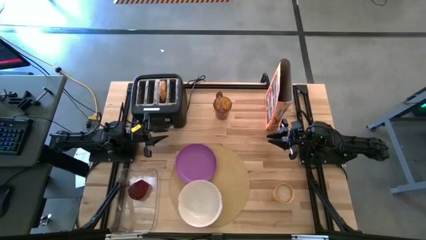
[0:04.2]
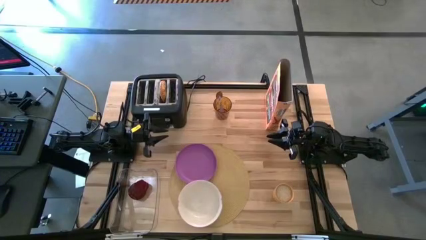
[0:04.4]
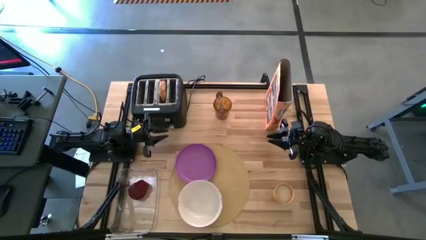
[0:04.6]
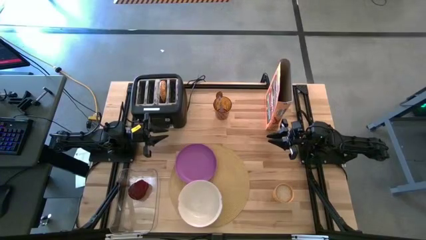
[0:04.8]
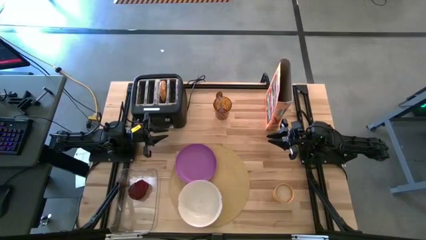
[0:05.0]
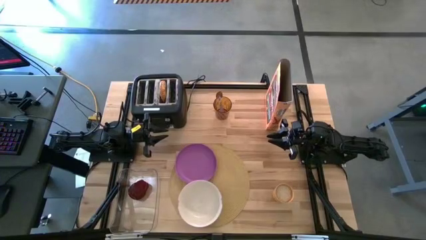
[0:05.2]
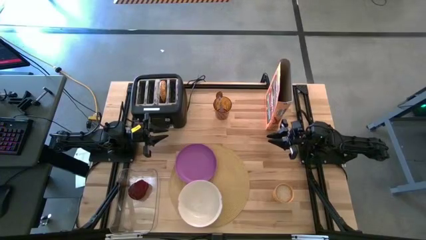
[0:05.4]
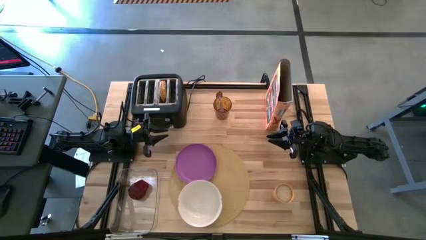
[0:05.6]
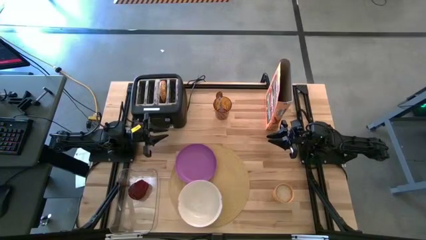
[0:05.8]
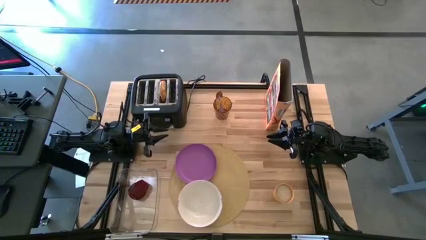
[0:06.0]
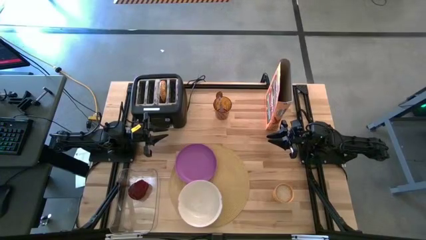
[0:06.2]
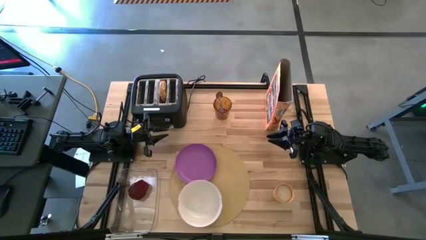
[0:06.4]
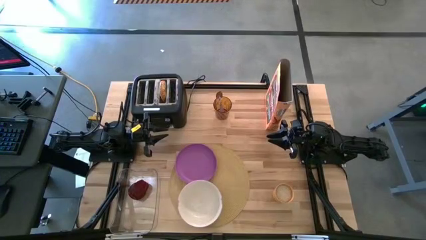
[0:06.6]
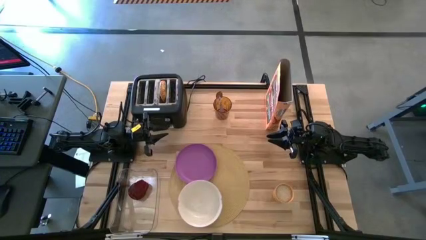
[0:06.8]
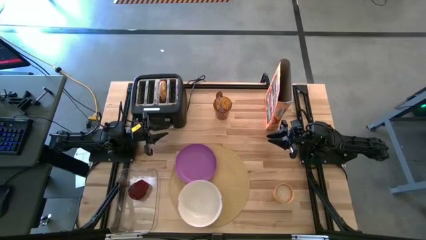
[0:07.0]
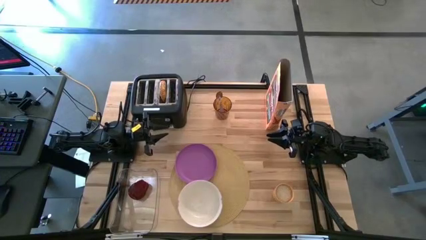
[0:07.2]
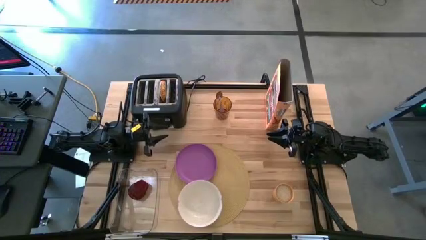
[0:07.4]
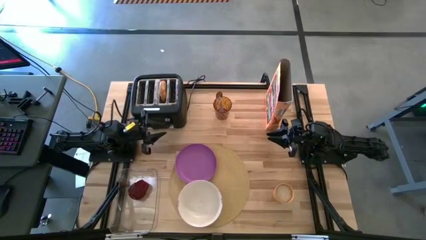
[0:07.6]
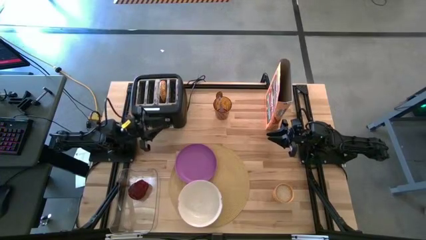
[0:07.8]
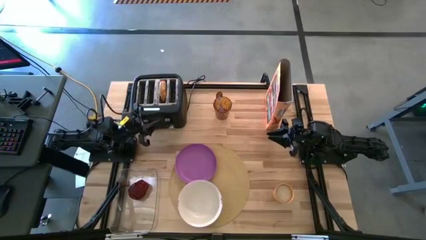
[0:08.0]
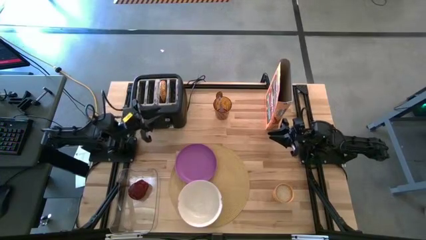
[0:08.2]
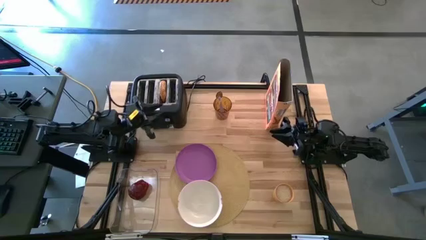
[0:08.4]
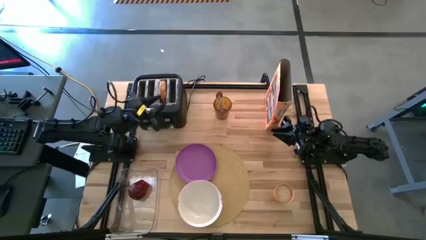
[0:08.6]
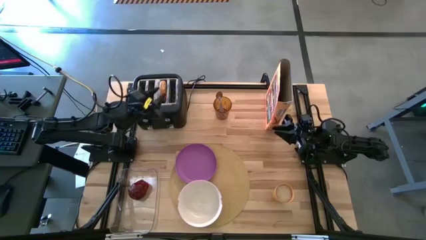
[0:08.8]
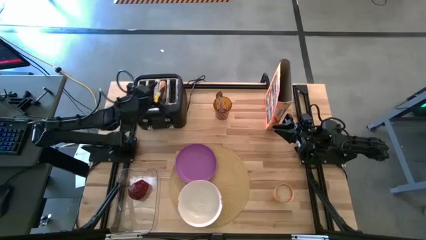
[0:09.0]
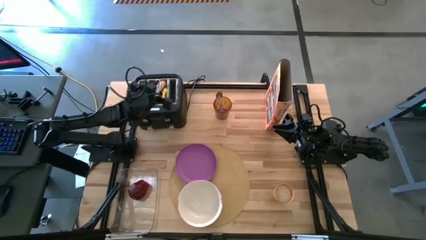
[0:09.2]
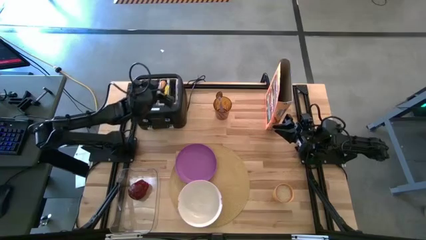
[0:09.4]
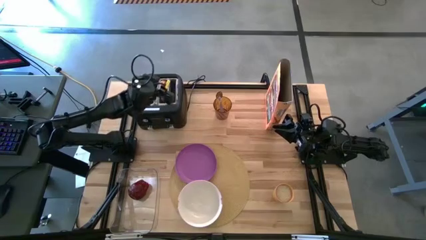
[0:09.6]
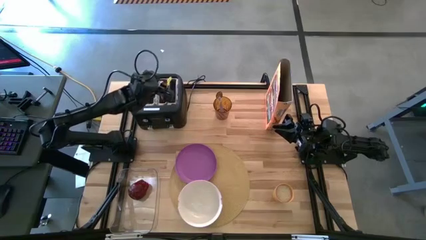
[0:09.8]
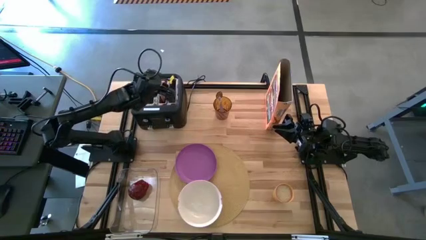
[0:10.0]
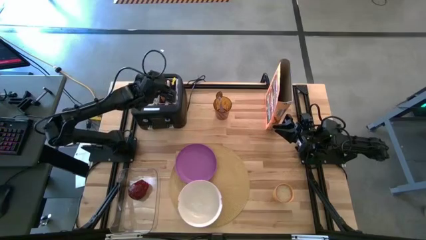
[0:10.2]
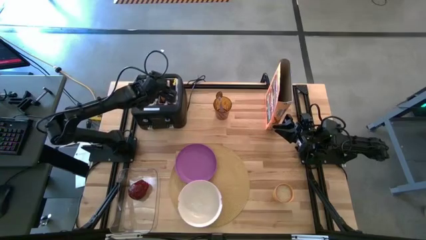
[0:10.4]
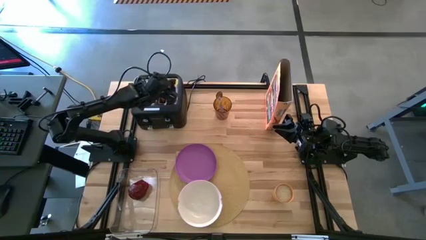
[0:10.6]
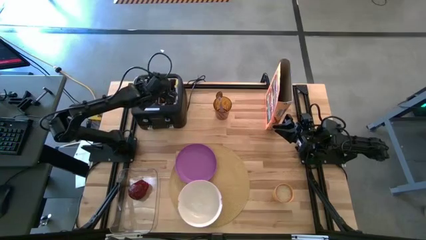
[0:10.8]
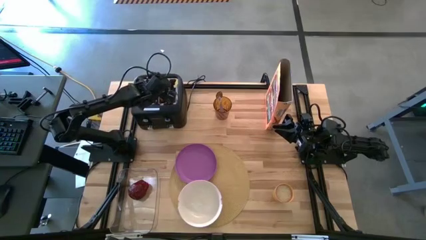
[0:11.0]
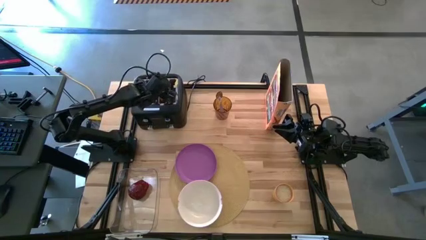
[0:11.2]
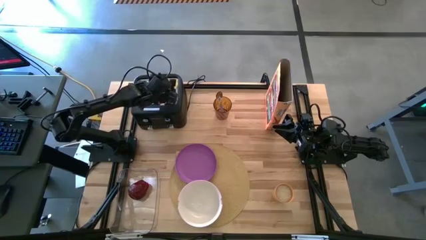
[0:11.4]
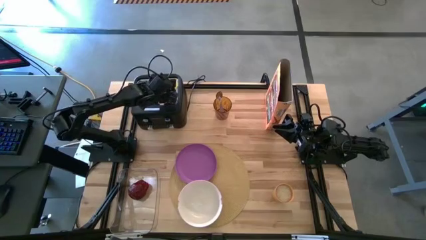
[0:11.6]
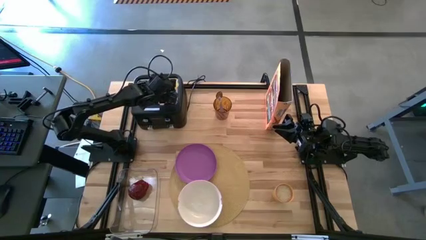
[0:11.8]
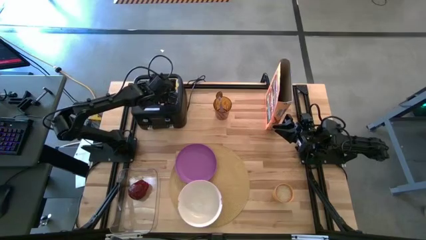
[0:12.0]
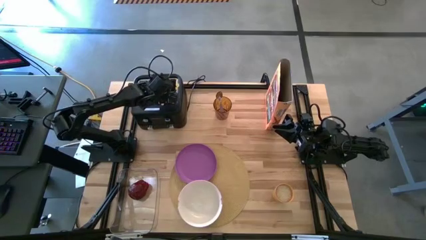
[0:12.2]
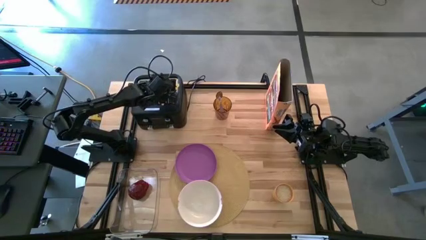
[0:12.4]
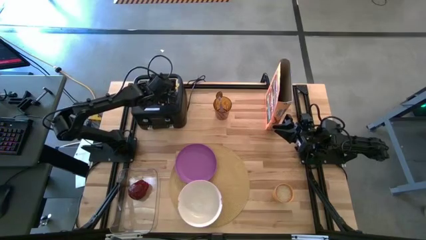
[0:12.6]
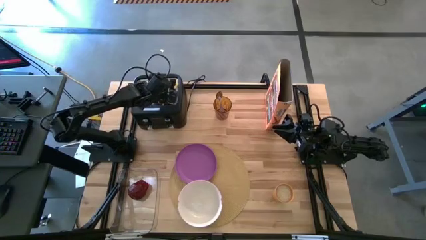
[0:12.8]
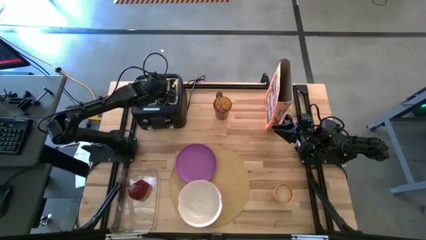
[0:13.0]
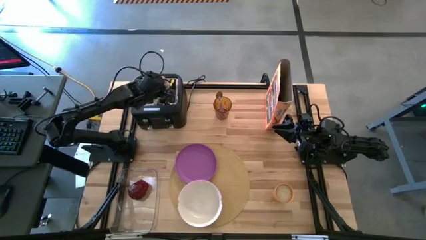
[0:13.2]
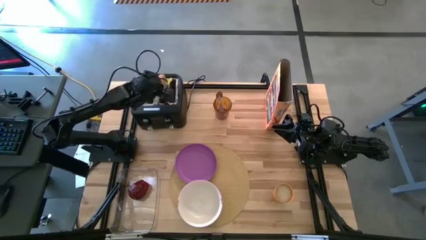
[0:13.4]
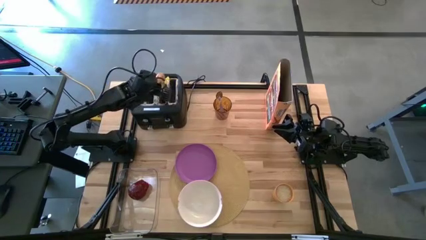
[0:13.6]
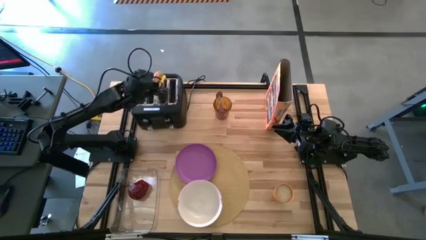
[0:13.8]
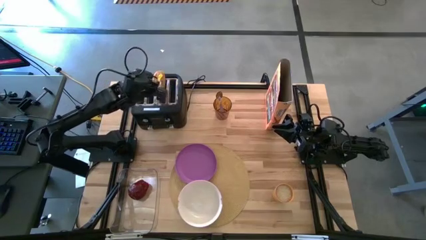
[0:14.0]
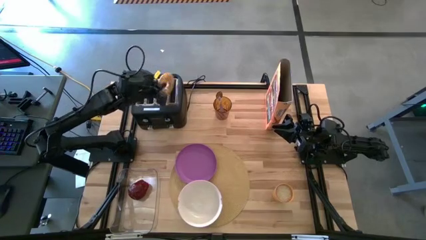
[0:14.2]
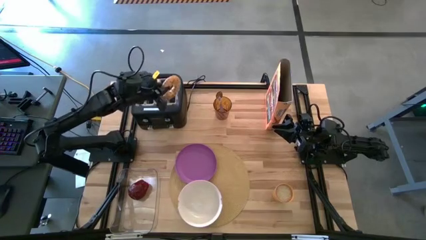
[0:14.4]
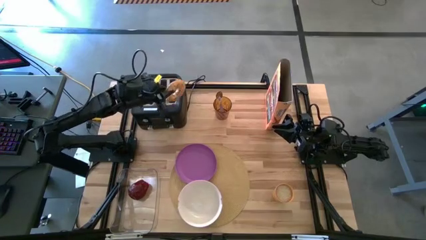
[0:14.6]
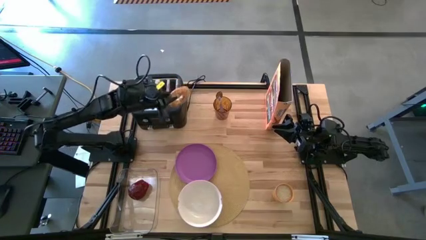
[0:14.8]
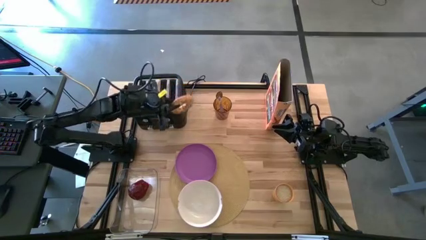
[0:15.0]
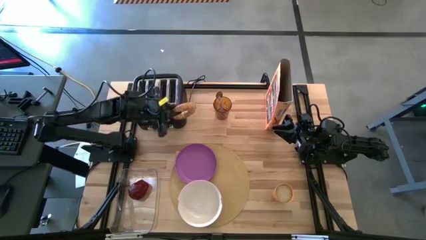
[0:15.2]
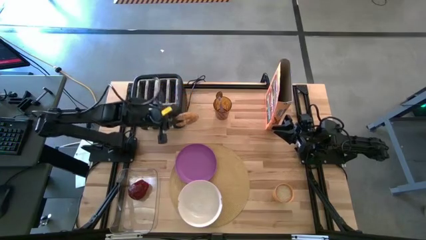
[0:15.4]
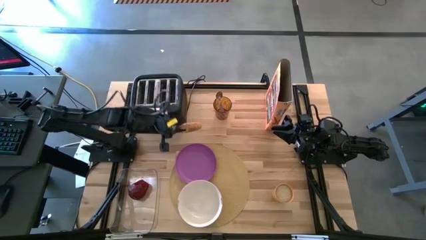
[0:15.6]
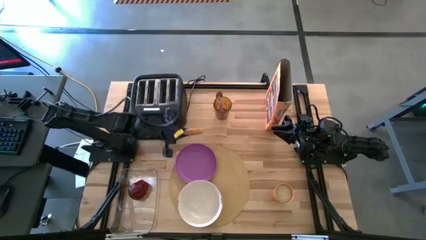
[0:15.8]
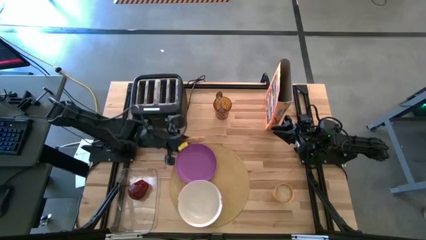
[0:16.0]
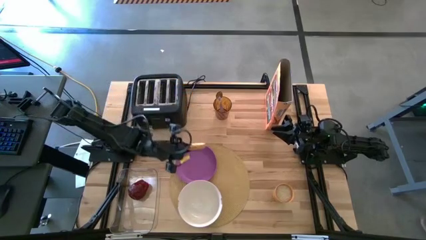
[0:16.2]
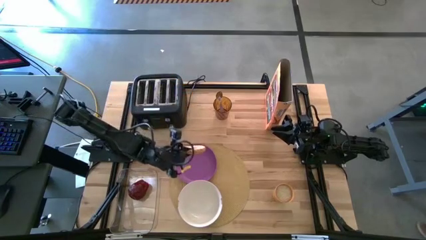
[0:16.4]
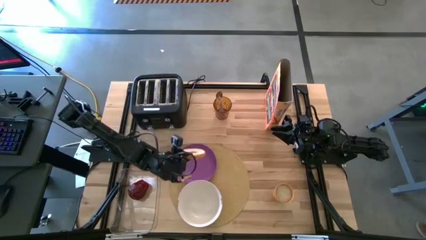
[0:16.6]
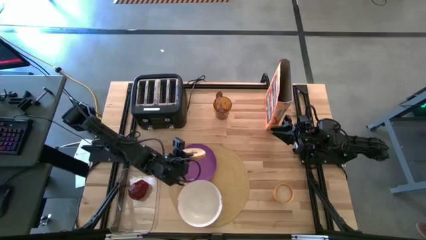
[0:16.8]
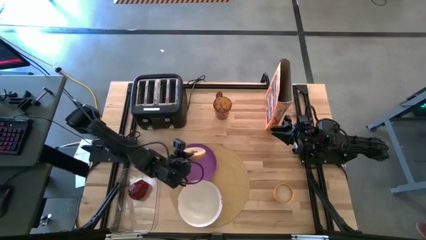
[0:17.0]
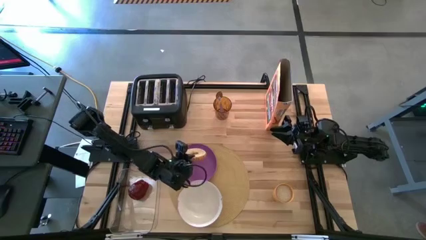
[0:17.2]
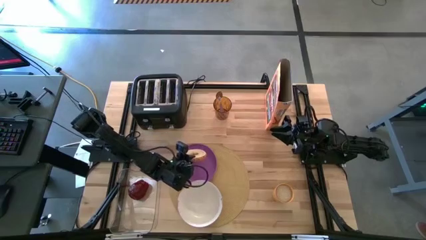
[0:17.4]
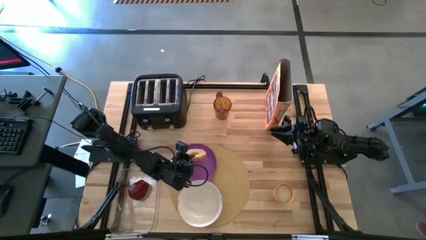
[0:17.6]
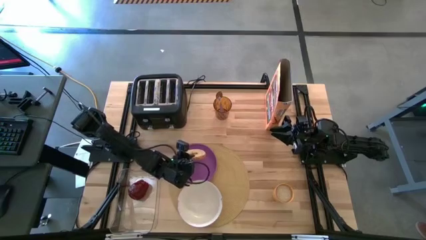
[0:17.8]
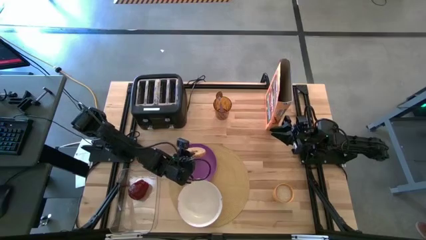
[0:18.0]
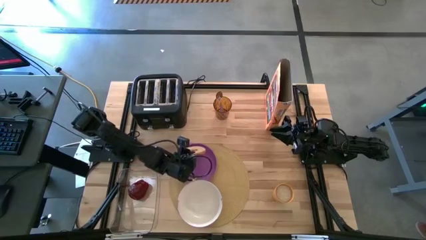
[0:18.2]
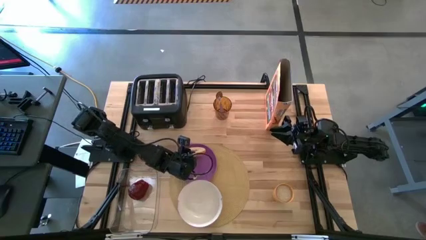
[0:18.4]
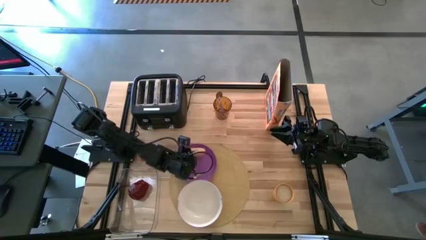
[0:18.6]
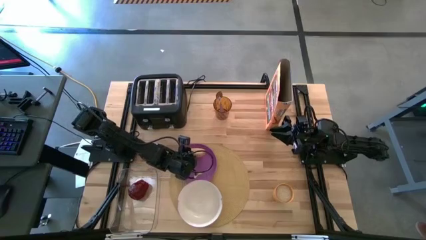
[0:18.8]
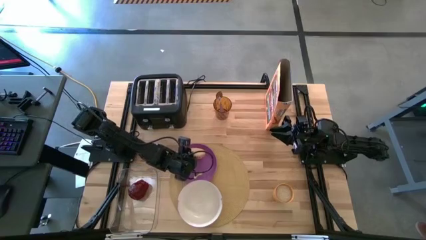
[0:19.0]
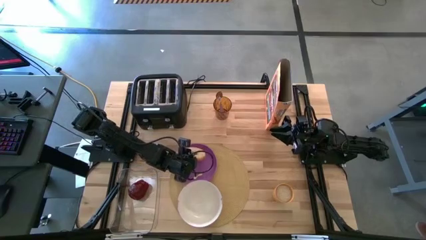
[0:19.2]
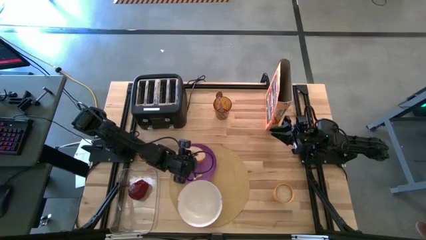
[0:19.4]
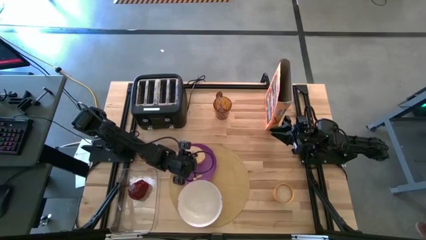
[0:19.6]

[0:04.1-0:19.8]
Task: Arrange a breakfast setting
Put the bagel from the toaster onto the purple plate
